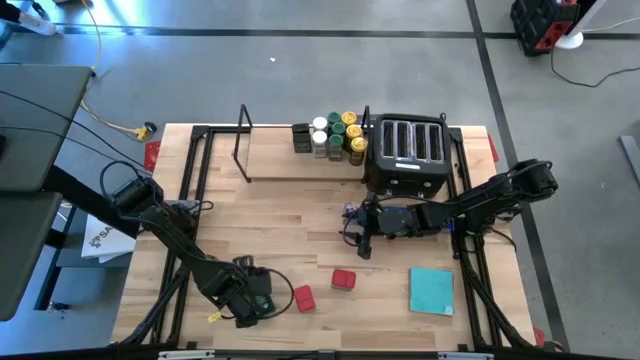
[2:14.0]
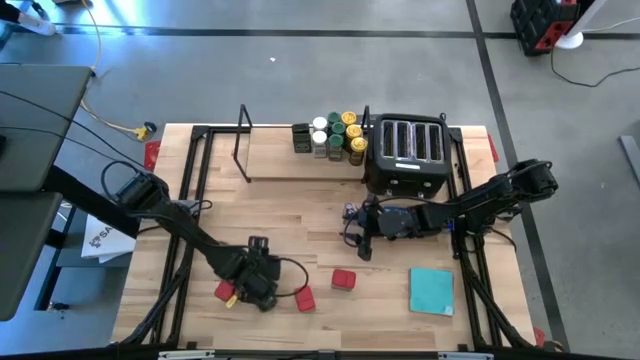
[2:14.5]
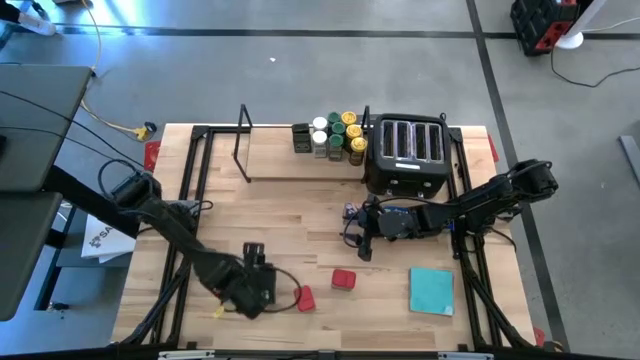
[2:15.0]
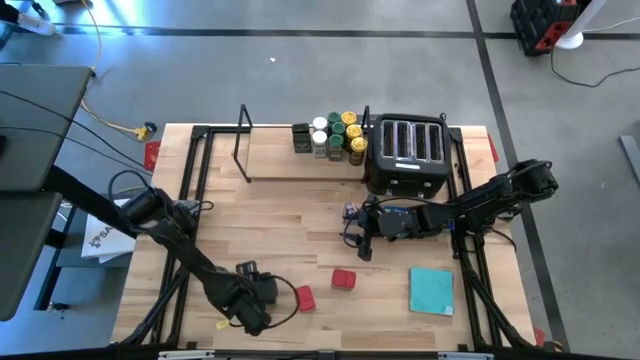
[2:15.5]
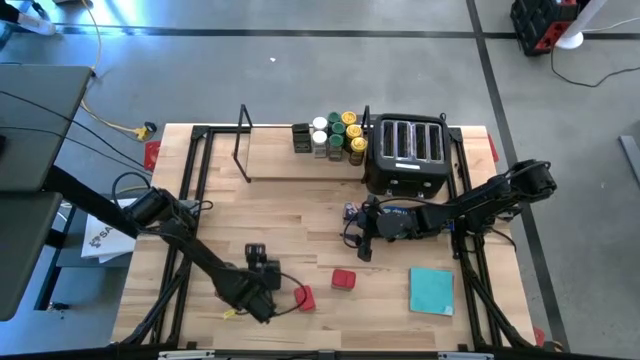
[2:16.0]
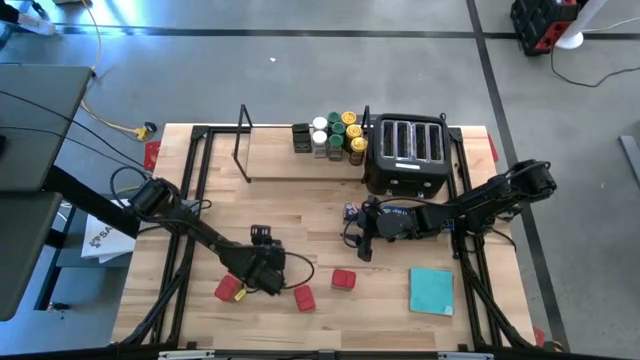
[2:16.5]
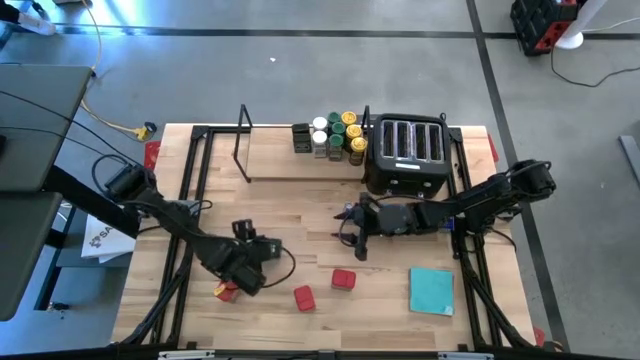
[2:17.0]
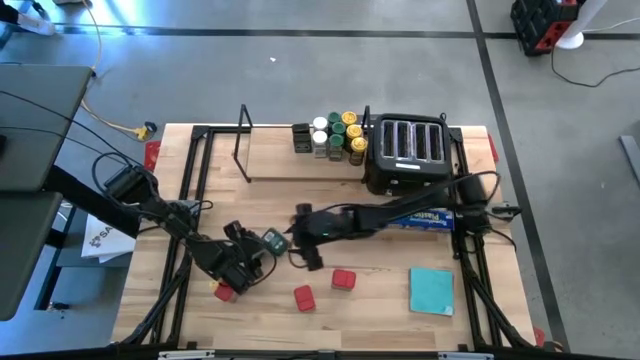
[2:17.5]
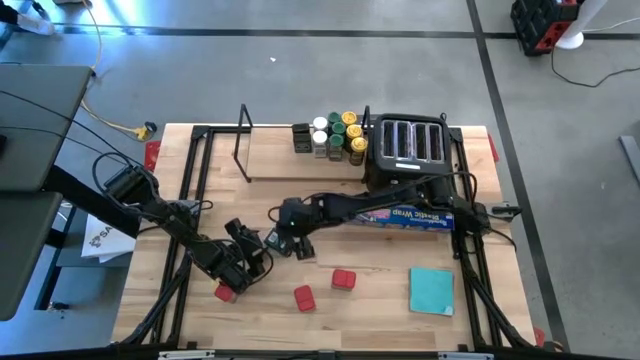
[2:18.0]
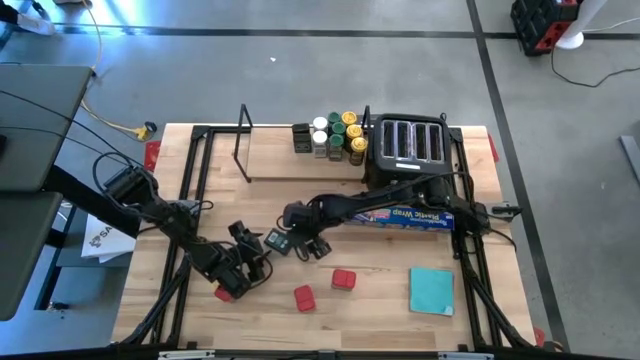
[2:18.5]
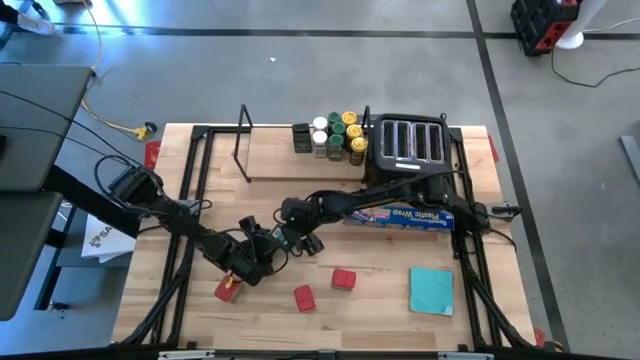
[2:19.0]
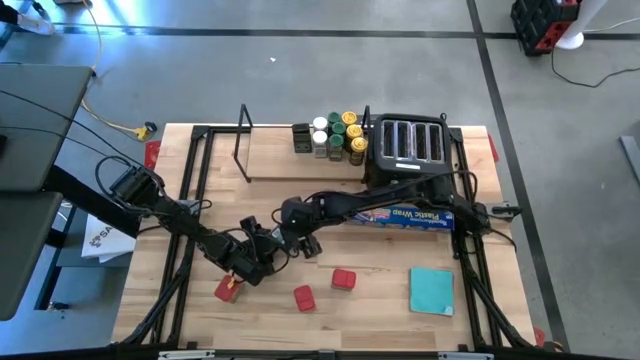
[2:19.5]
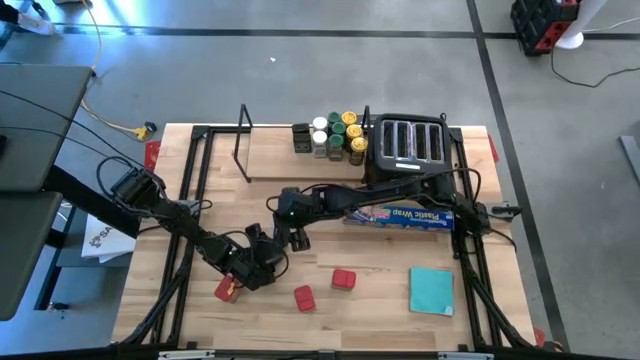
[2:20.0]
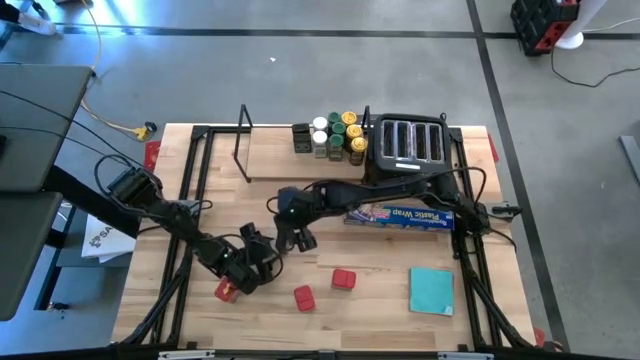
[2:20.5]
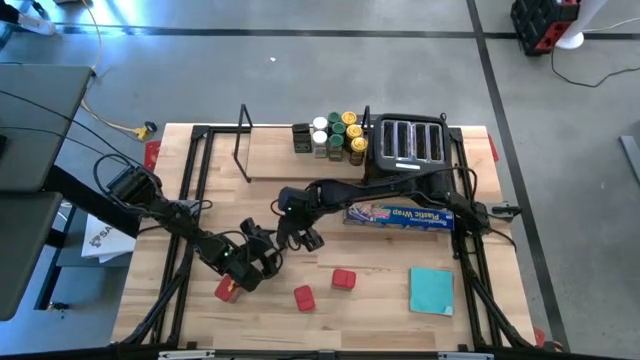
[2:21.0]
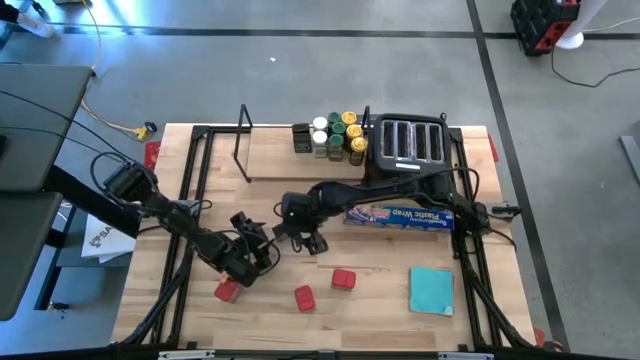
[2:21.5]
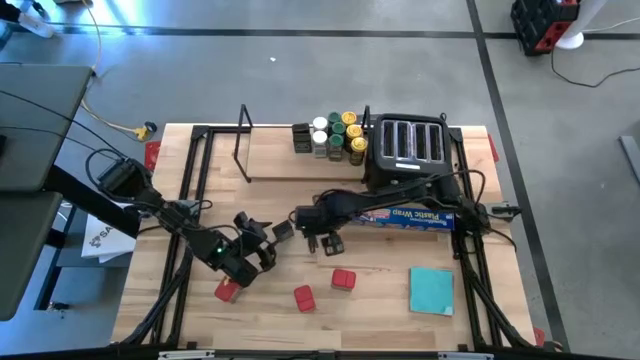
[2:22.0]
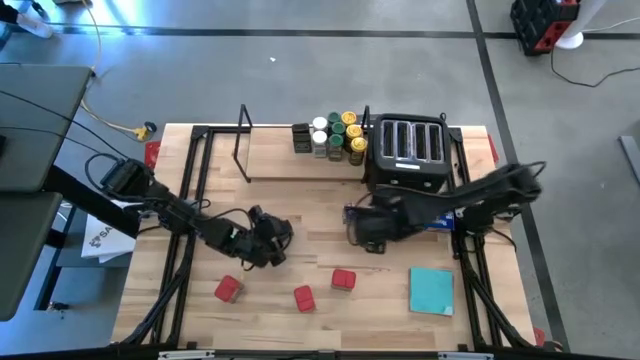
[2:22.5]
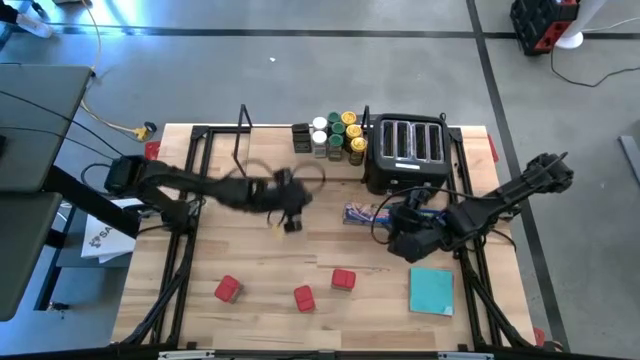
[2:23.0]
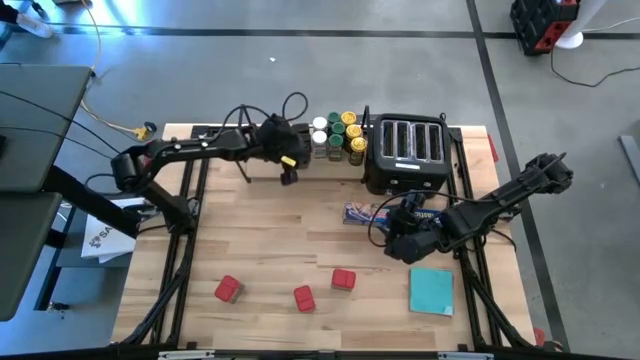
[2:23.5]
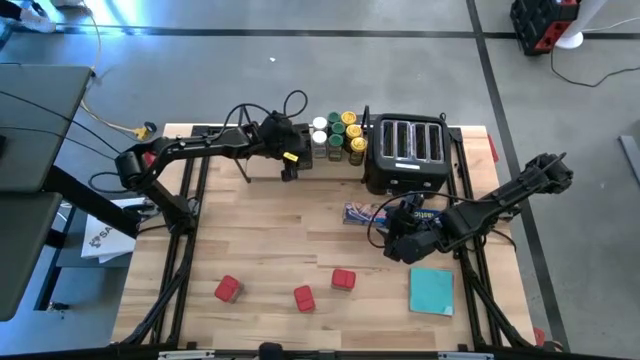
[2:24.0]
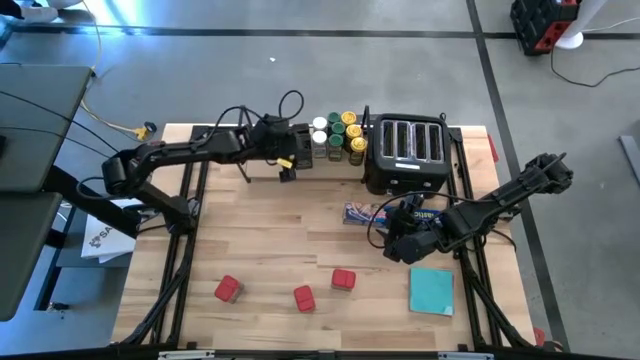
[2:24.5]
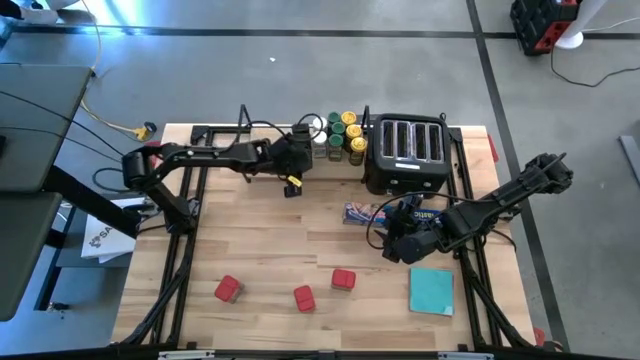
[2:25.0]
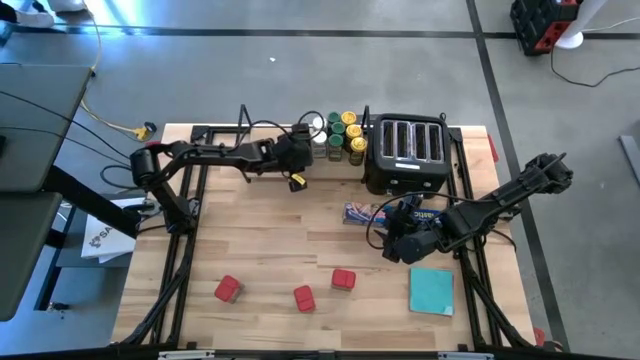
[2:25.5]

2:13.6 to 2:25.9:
Task: Shelf spices
Put the black seasoning can on the shelf aligned with the other black seasoning can

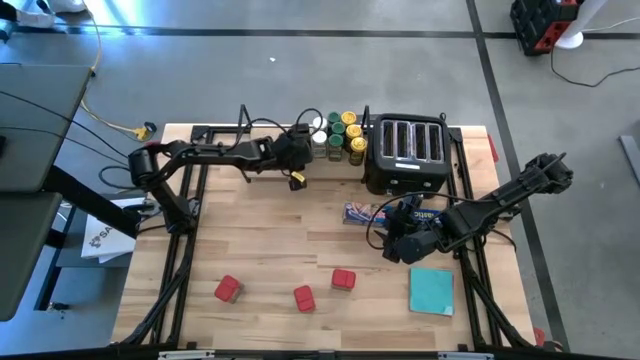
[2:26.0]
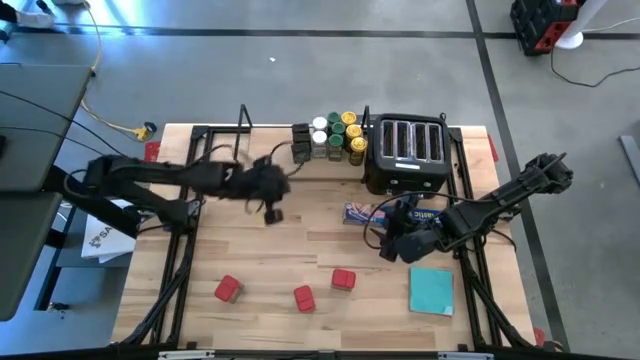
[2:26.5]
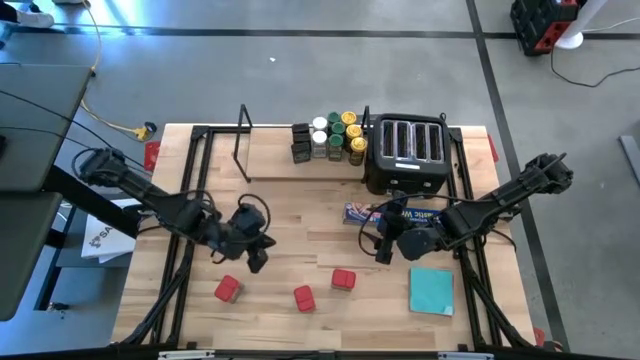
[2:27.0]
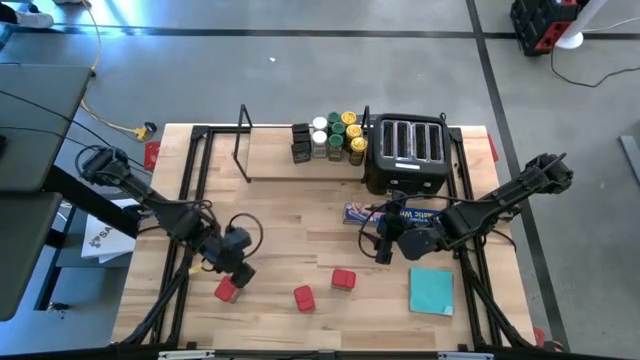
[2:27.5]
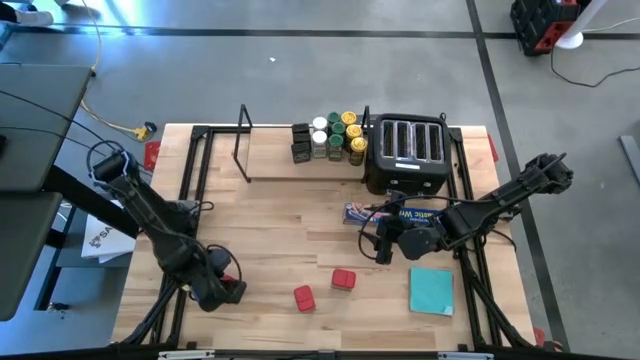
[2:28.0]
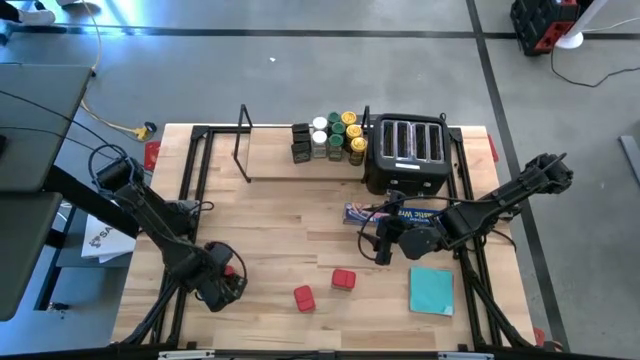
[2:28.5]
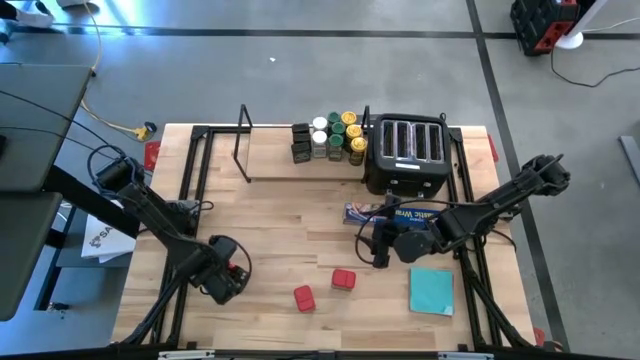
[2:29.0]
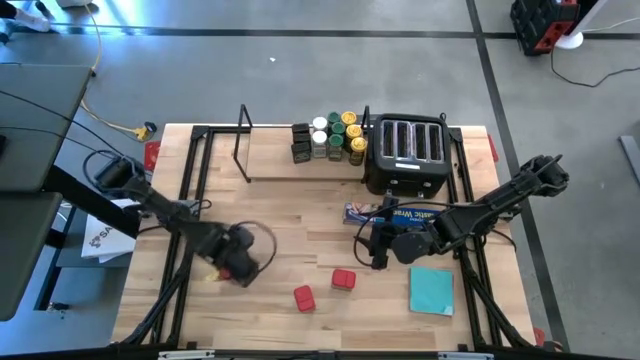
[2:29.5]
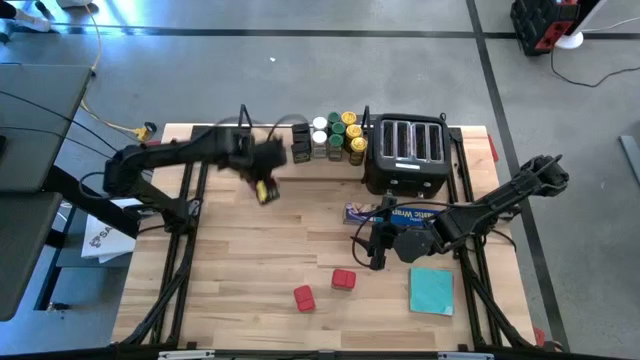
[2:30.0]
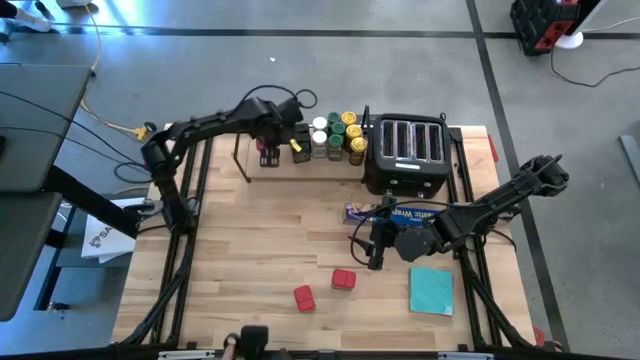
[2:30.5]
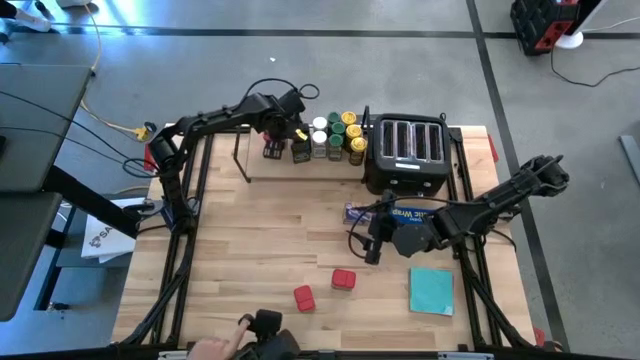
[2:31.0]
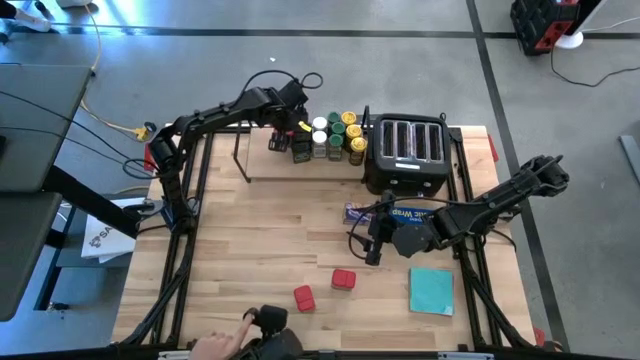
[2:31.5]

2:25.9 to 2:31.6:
Put the left red seasoning can on the shelf

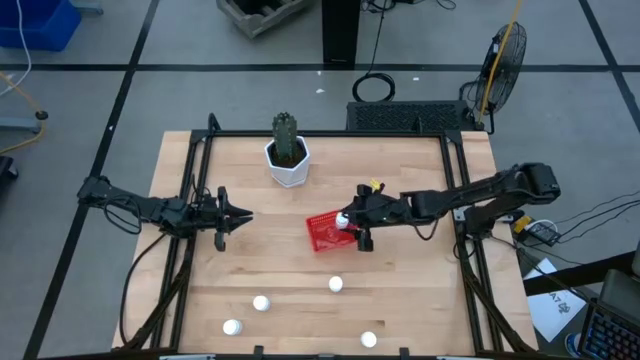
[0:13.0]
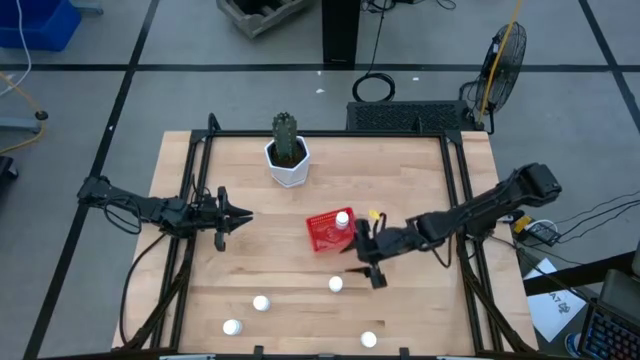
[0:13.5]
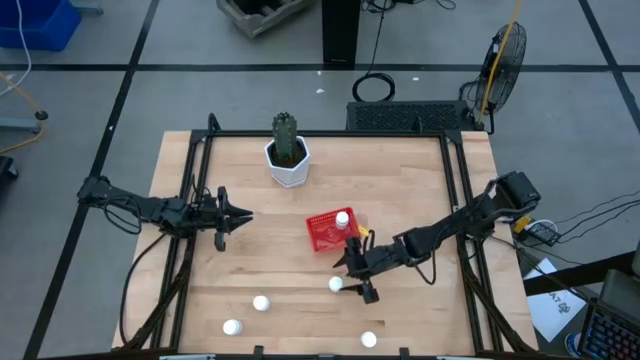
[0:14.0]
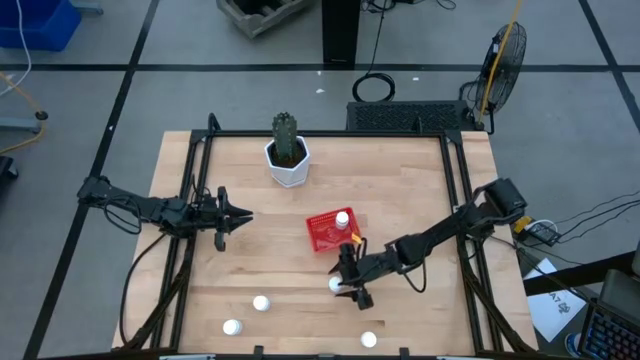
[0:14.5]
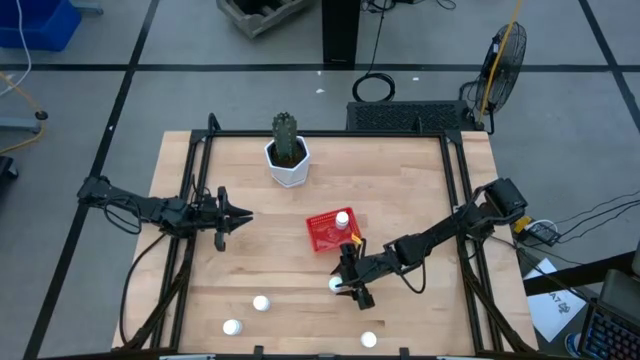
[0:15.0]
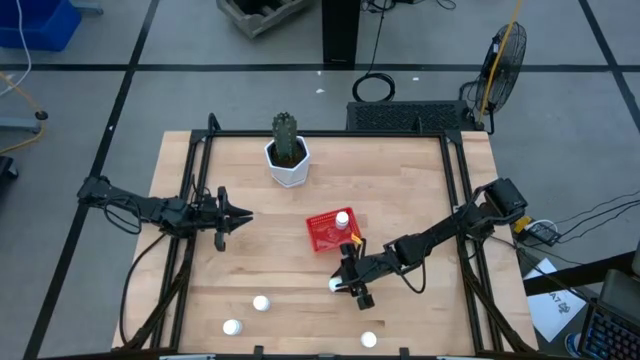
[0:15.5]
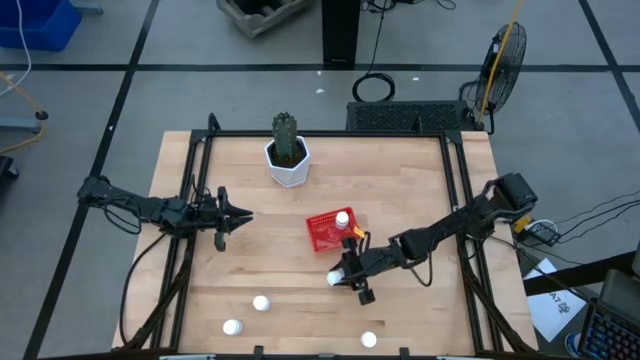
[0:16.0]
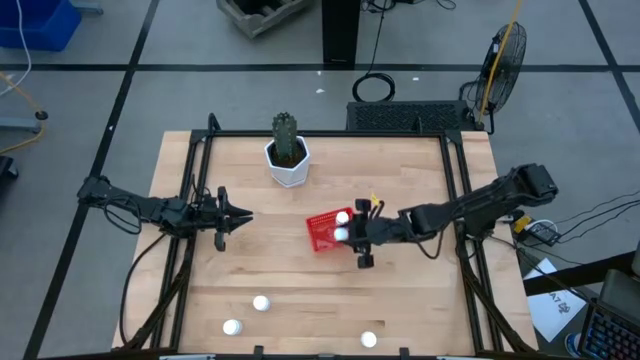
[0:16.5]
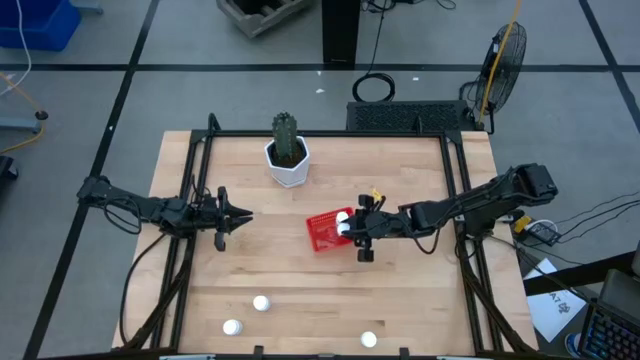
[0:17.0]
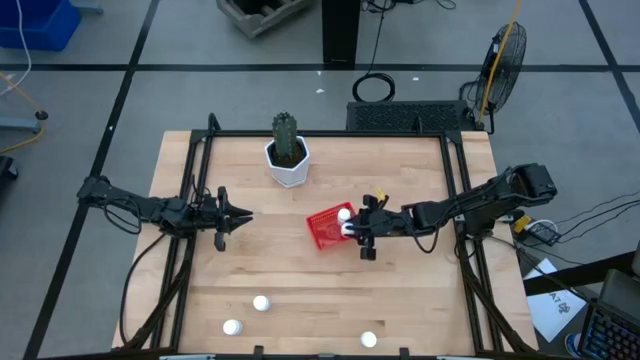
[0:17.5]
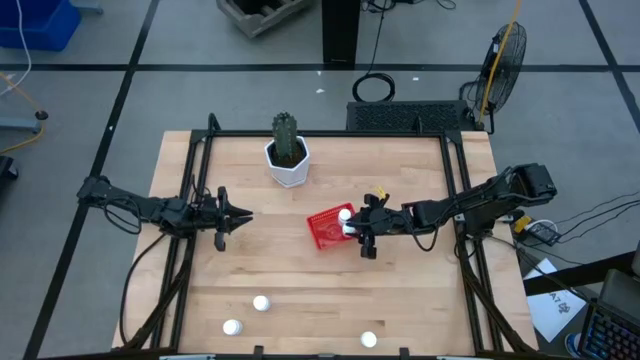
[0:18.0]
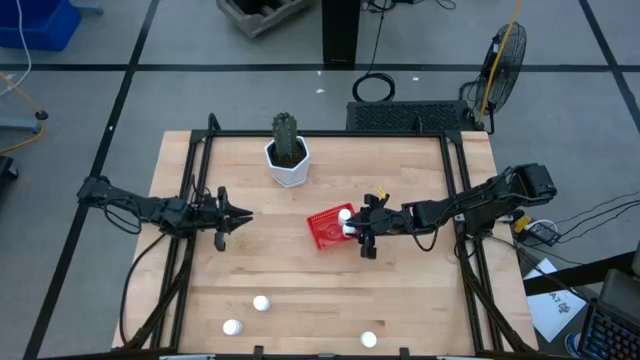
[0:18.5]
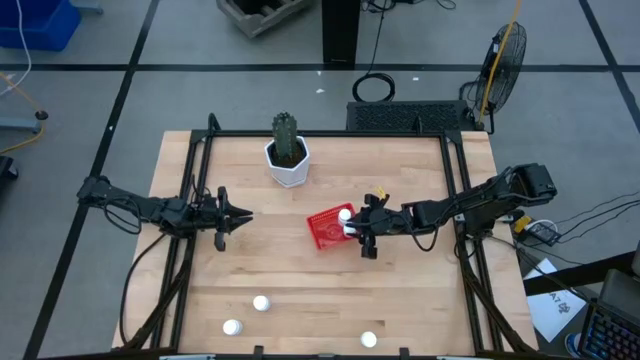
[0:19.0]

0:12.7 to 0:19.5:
Task: Pick and place pill bottles into a basket
Put the white medicine bottle into the red bin
